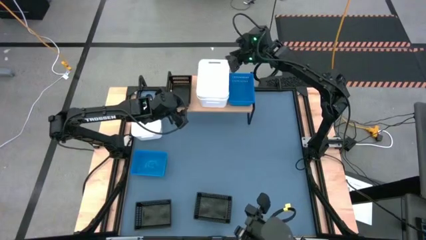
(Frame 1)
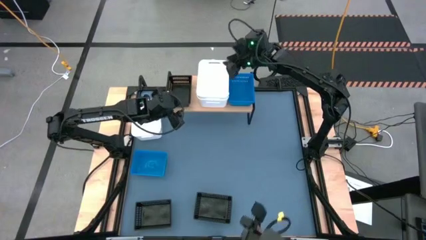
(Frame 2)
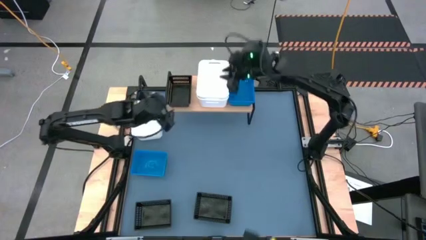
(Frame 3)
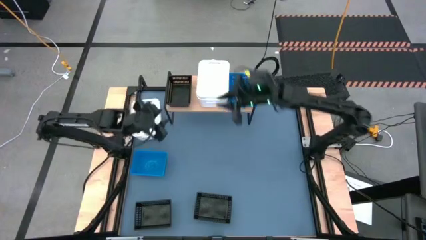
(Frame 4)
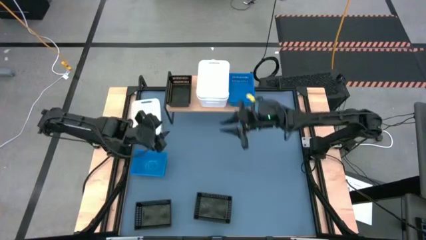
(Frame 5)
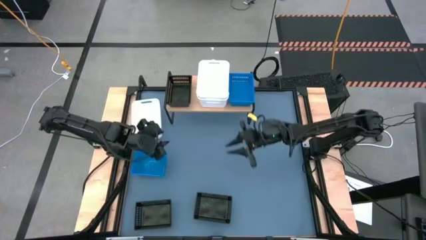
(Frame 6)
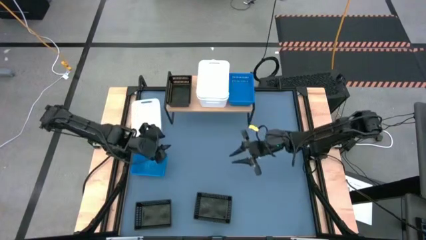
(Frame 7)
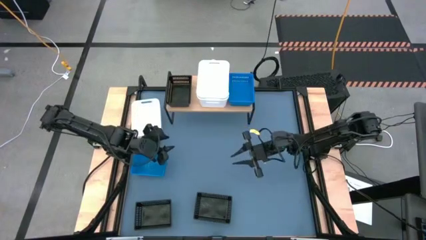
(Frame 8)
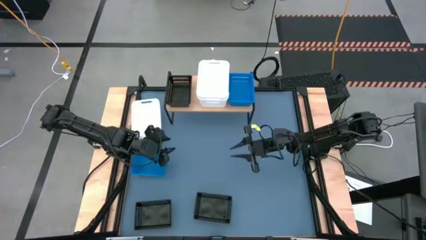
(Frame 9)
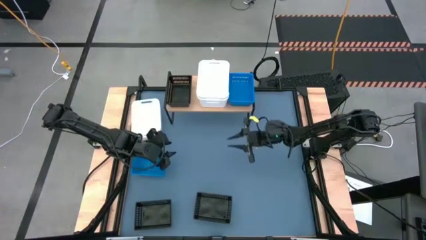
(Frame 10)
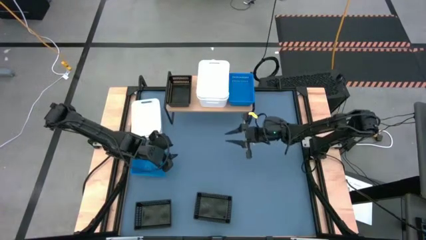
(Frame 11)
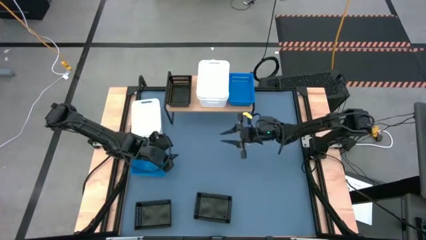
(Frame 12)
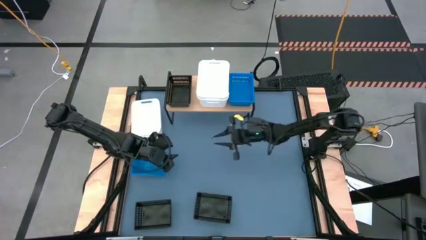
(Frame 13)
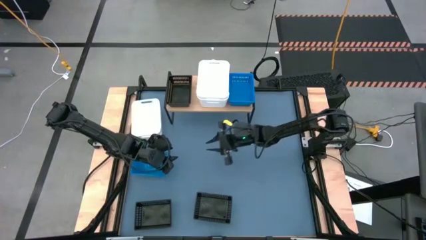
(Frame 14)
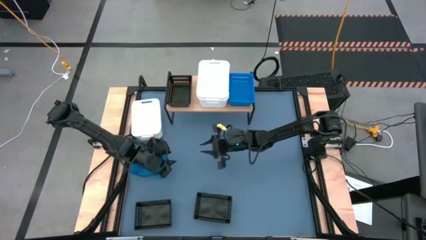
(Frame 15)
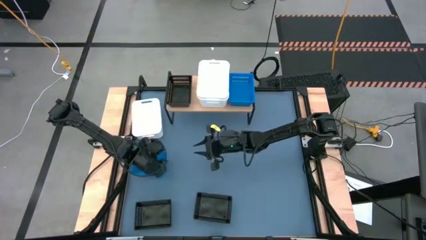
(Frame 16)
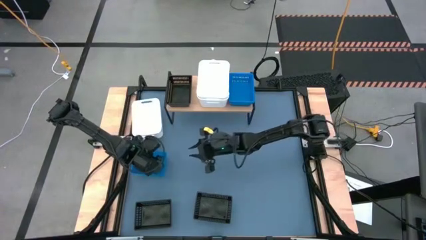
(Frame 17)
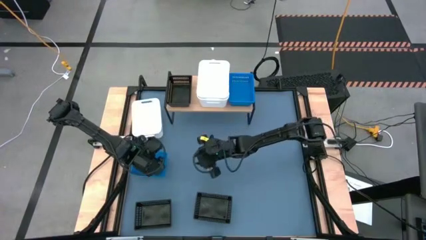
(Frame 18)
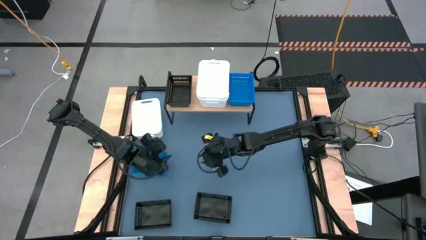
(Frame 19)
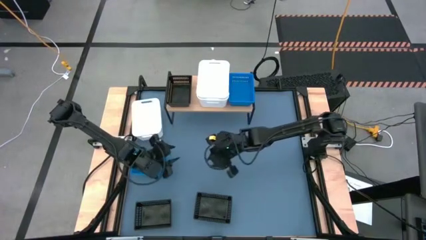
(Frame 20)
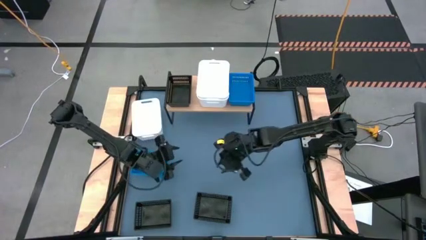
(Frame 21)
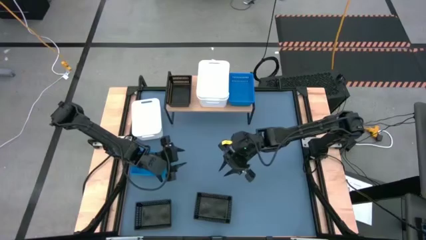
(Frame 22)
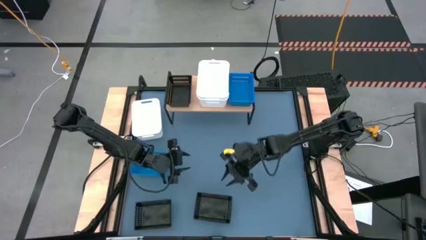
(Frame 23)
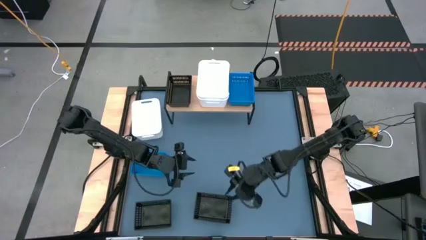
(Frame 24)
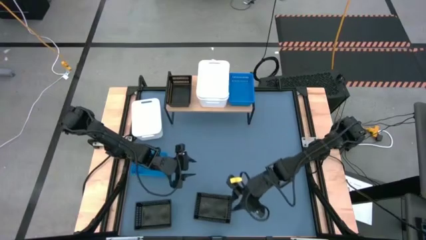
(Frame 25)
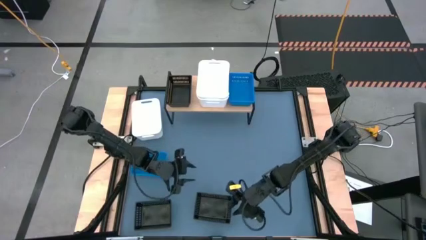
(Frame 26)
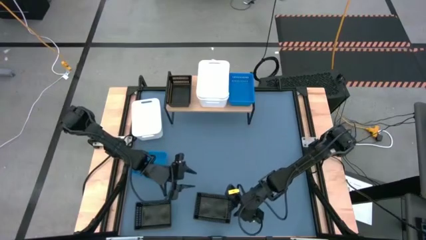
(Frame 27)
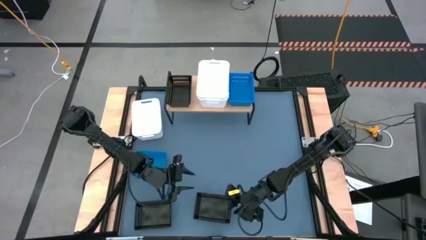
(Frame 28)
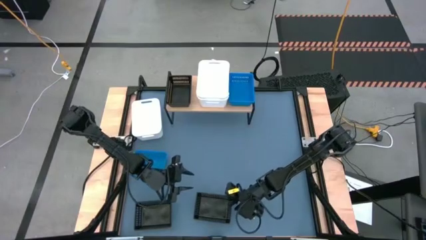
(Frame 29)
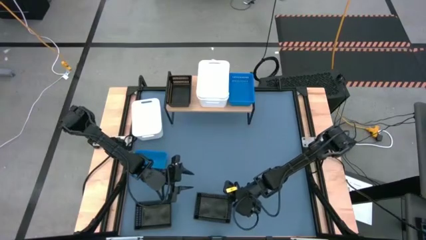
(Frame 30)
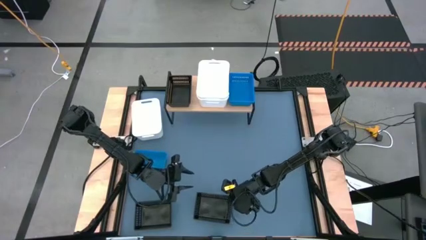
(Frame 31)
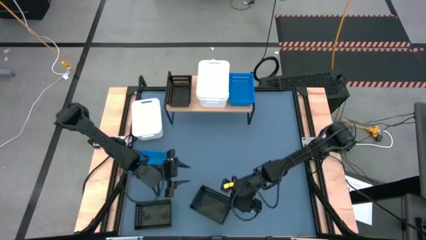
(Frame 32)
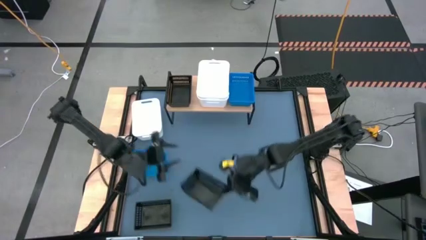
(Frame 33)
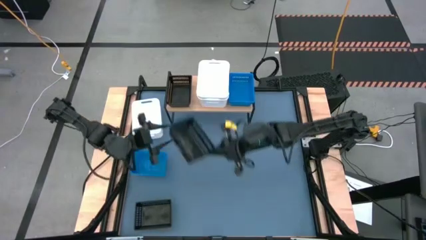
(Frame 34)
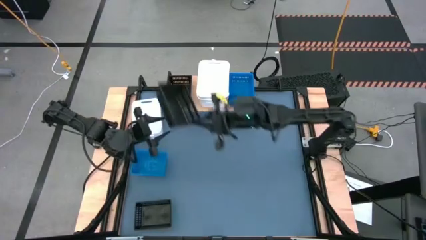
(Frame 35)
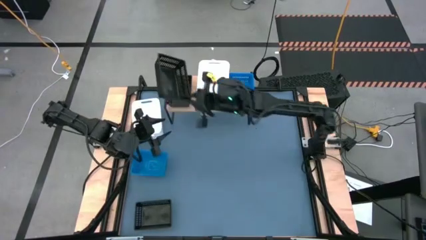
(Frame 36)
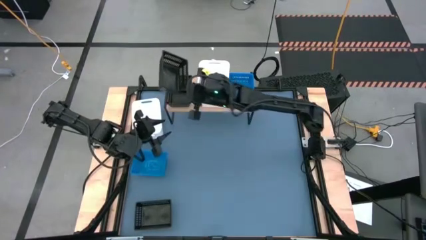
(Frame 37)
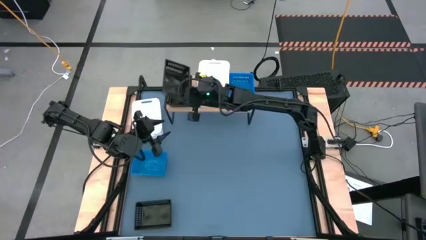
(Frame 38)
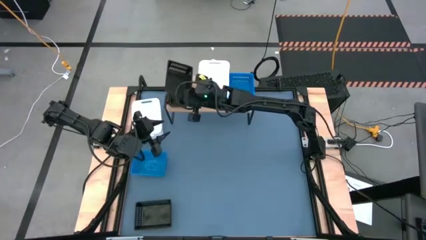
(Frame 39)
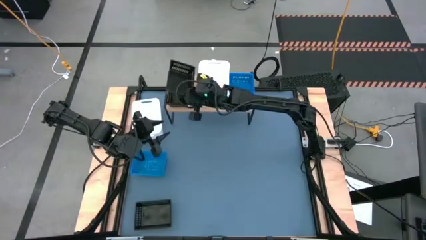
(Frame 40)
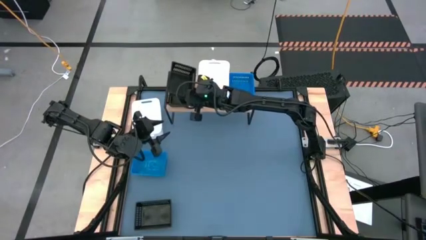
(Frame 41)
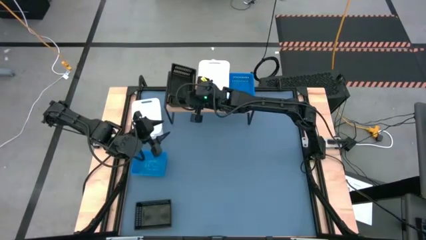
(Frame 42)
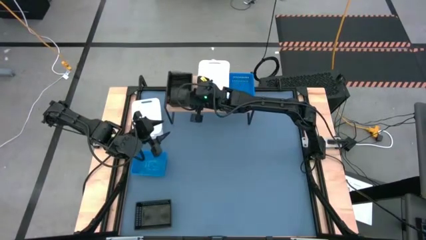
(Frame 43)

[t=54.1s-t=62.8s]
Task: Stack baskets on shelf by color
Stack the right black bin on top of the other black bin on the shelf

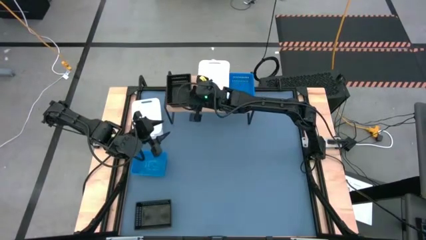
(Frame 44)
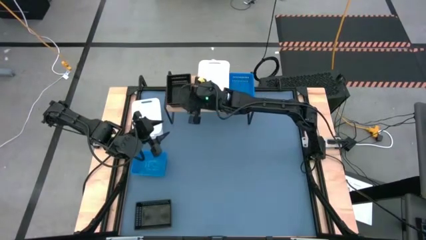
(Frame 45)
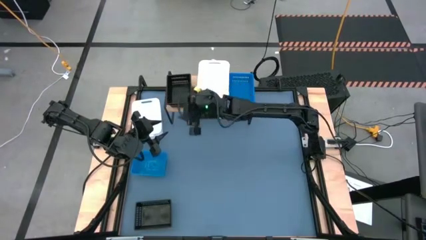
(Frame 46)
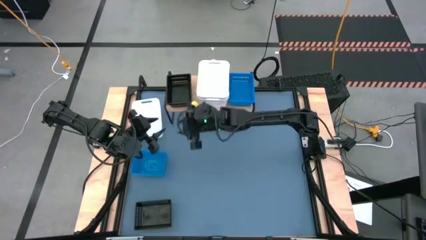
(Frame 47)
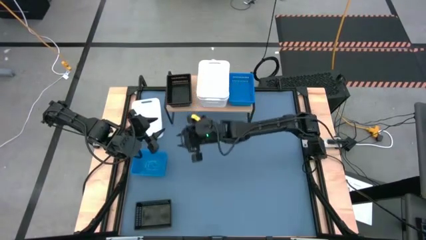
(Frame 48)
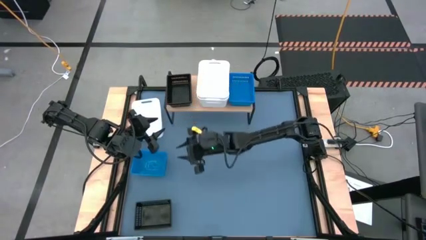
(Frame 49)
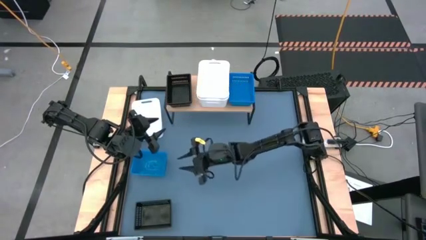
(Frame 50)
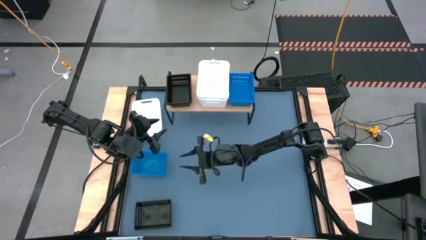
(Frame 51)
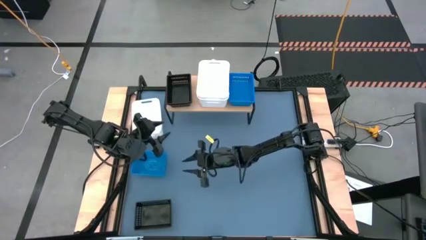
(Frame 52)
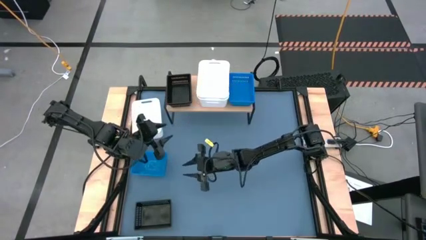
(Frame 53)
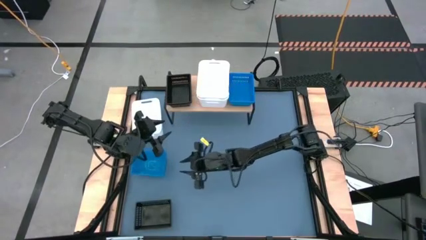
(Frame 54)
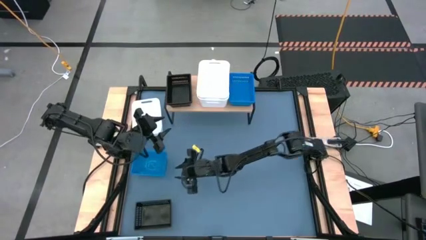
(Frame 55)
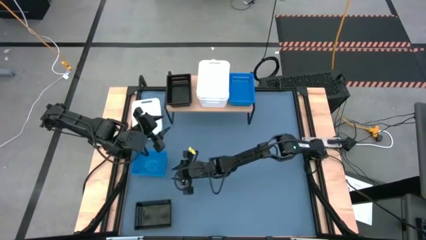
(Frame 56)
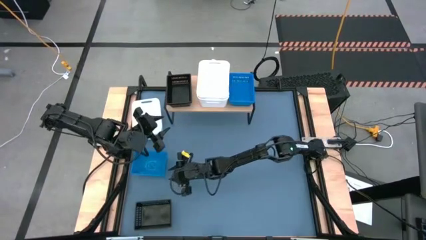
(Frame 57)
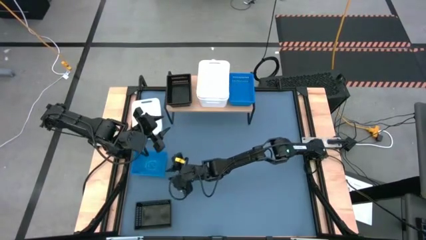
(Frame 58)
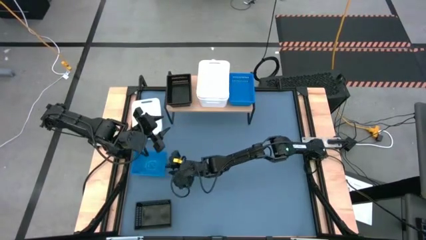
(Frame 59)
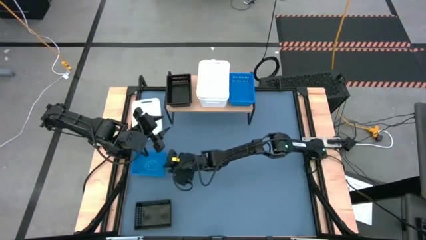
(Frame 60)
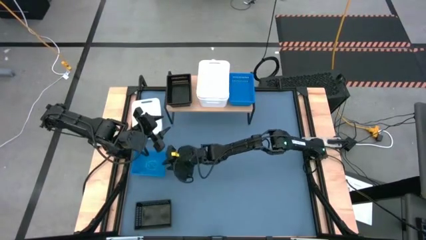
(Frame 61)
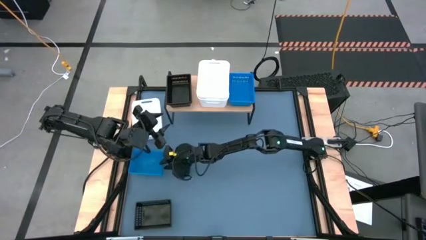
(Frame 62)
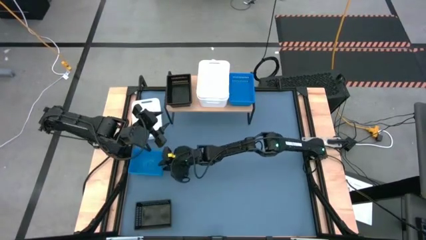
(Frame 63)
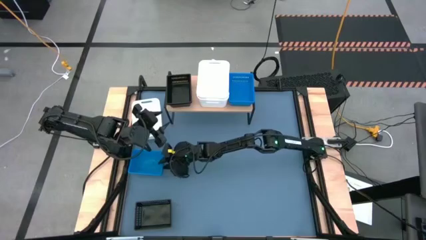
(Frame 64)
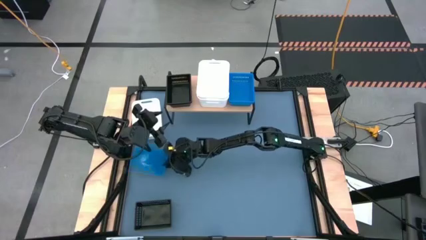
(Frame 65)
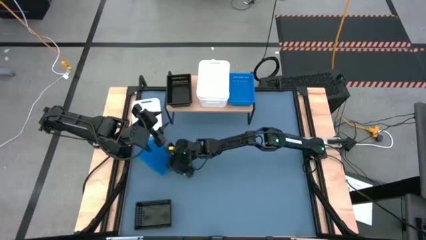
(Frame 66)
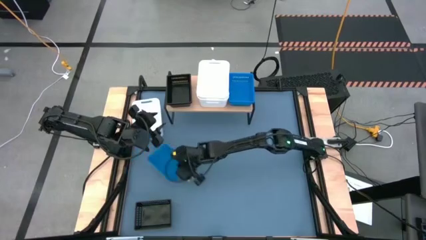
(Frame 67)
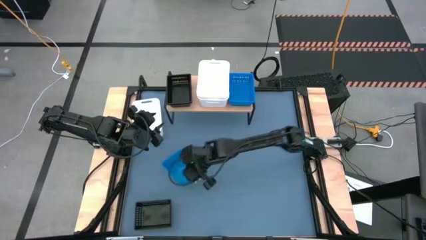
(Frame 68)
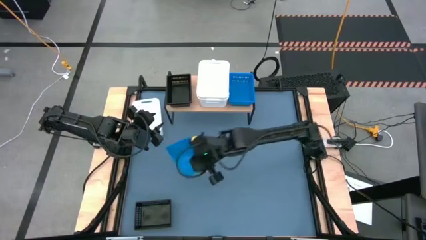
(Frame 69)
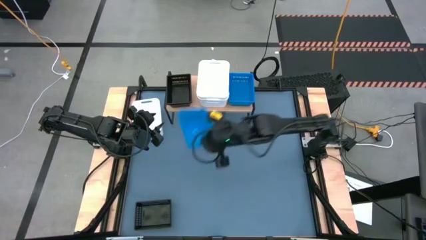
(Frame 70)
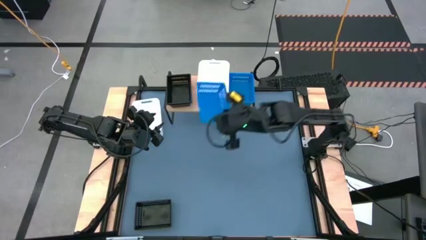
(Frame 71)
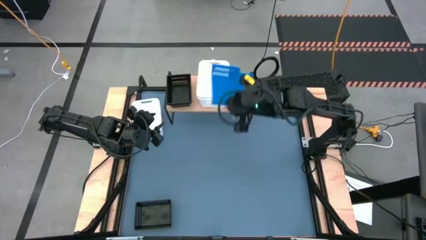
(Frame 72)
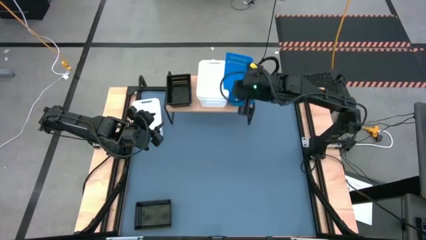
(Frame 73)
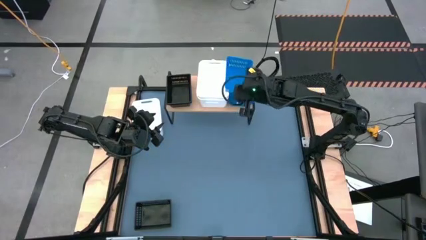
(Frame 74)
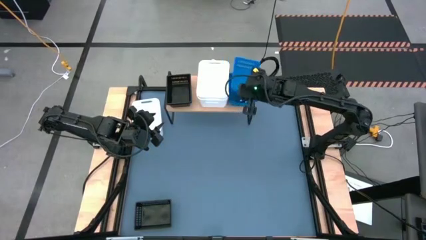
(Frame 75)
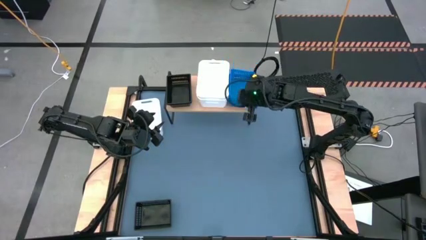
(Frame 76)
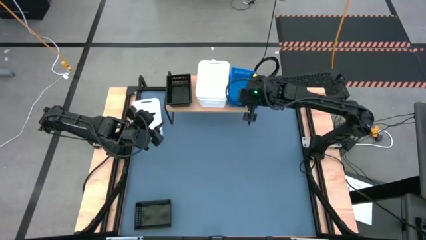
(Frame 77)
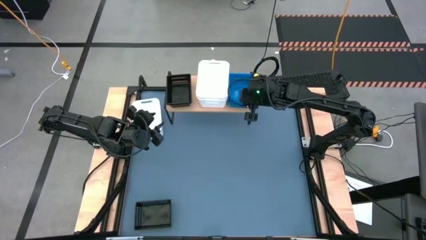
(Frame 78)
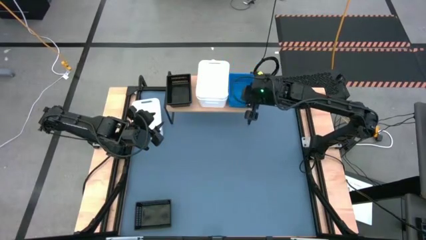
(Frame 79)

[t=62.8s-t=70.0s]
Stack the blue bin on top of the other blue bins on the shelf
